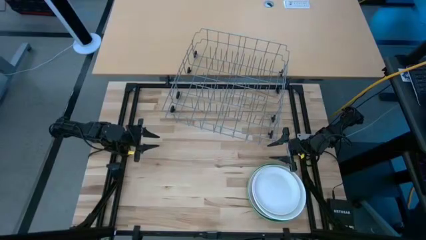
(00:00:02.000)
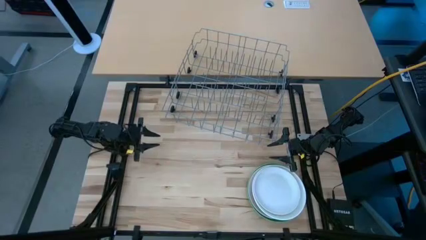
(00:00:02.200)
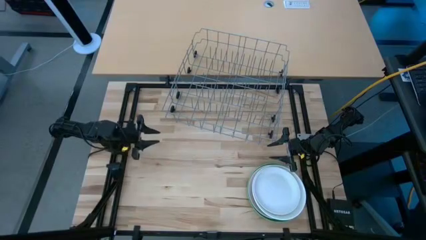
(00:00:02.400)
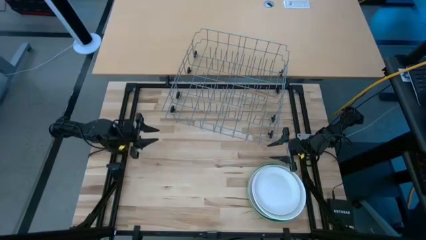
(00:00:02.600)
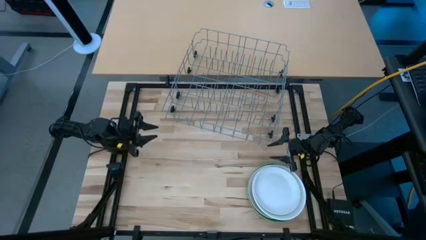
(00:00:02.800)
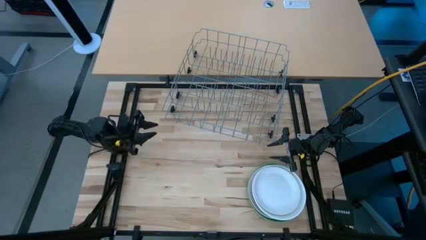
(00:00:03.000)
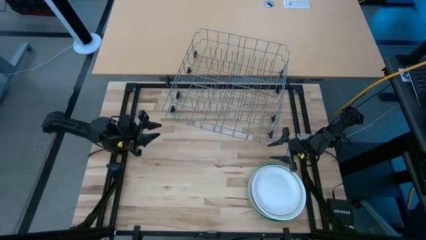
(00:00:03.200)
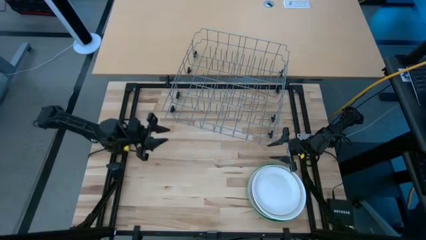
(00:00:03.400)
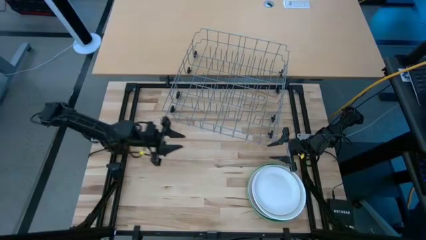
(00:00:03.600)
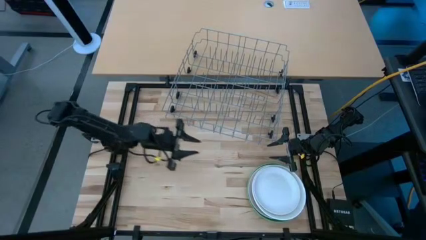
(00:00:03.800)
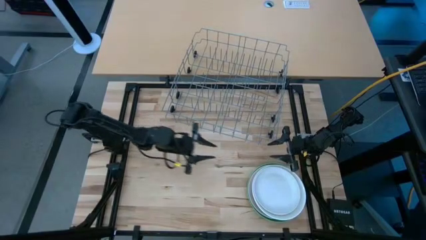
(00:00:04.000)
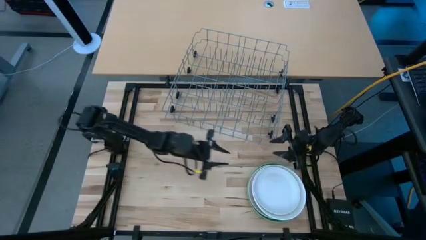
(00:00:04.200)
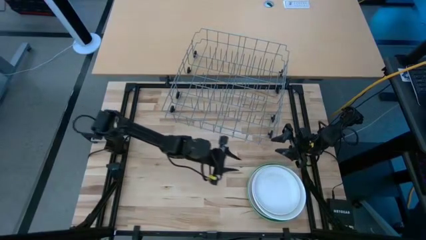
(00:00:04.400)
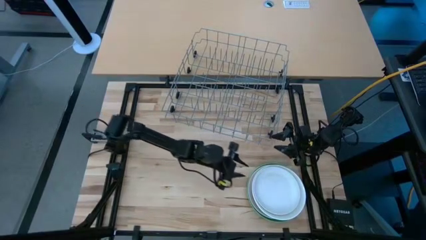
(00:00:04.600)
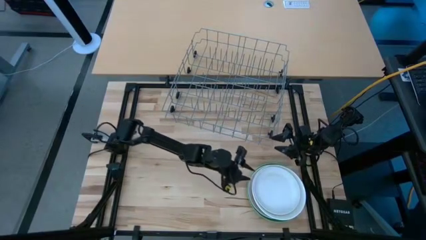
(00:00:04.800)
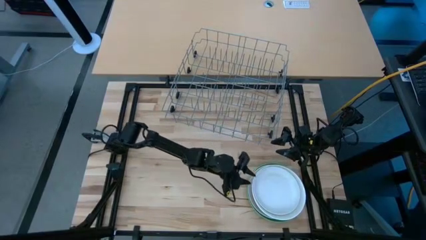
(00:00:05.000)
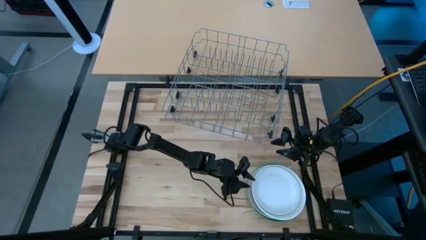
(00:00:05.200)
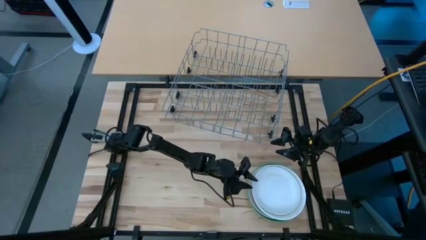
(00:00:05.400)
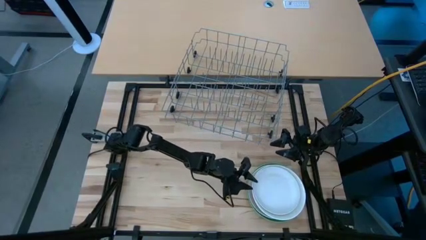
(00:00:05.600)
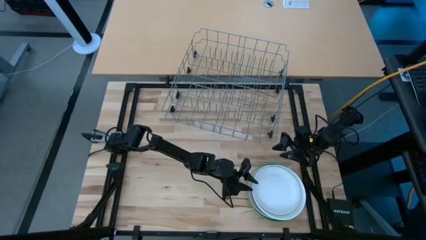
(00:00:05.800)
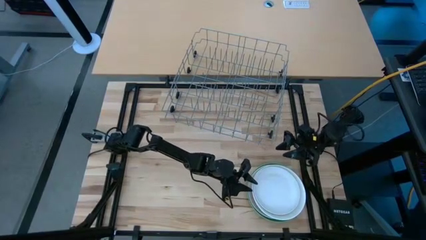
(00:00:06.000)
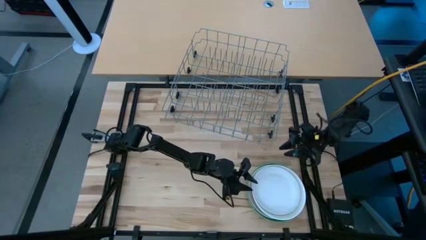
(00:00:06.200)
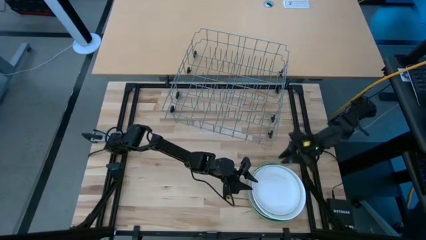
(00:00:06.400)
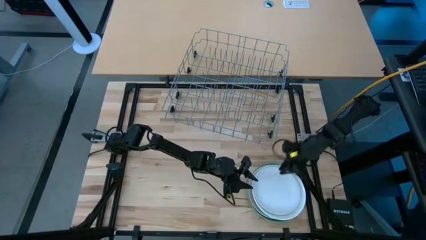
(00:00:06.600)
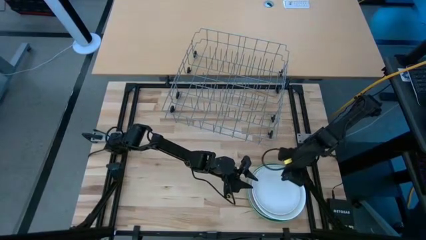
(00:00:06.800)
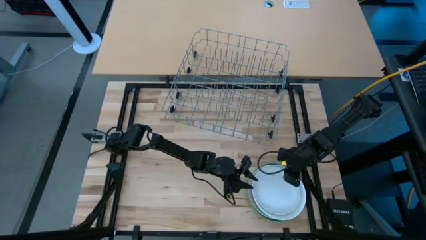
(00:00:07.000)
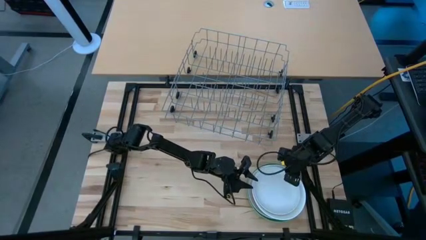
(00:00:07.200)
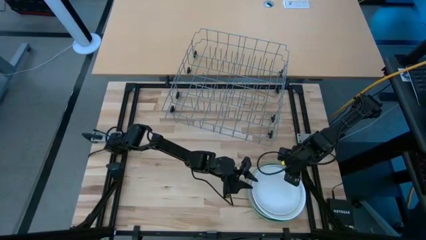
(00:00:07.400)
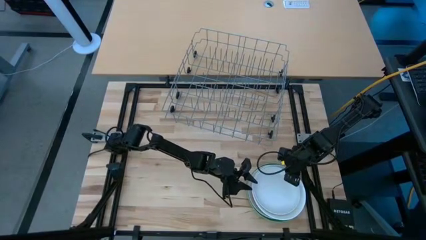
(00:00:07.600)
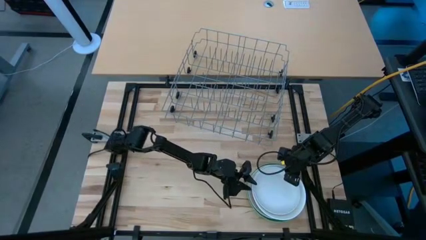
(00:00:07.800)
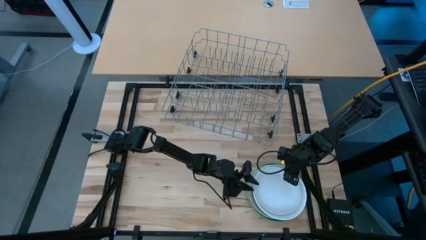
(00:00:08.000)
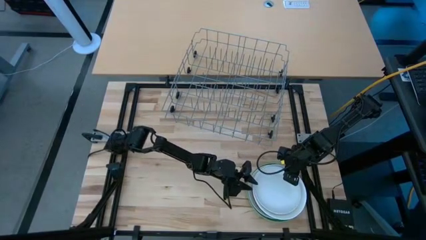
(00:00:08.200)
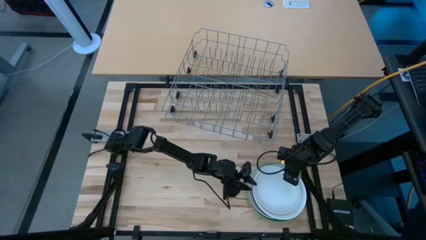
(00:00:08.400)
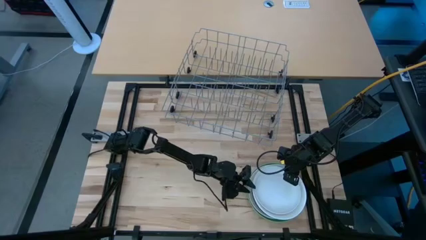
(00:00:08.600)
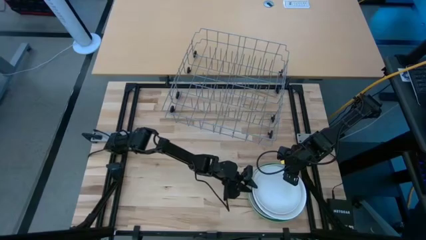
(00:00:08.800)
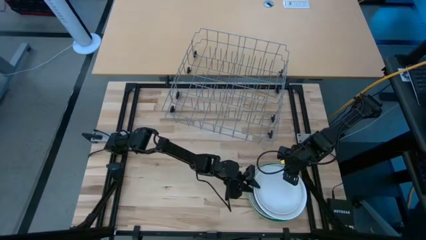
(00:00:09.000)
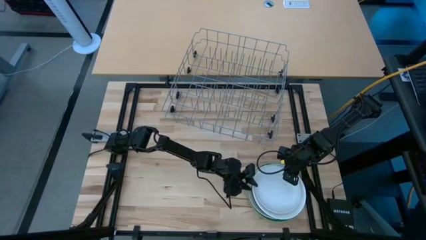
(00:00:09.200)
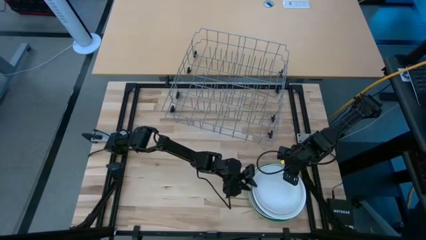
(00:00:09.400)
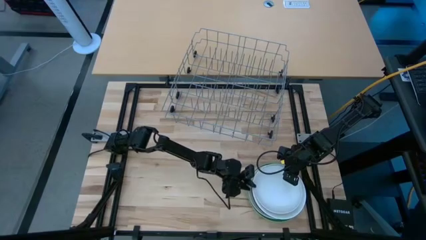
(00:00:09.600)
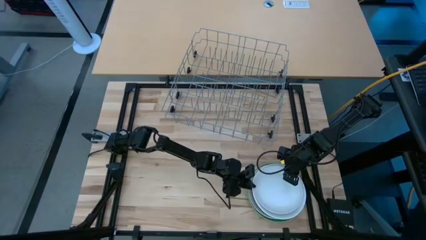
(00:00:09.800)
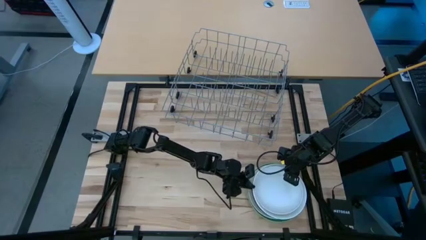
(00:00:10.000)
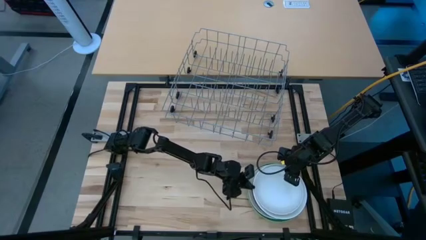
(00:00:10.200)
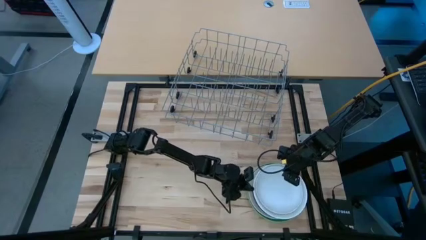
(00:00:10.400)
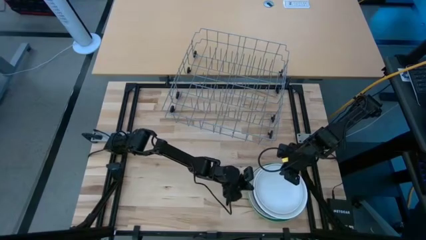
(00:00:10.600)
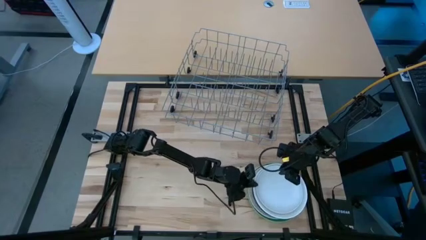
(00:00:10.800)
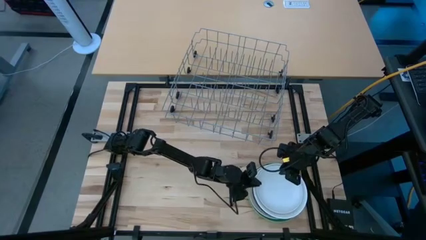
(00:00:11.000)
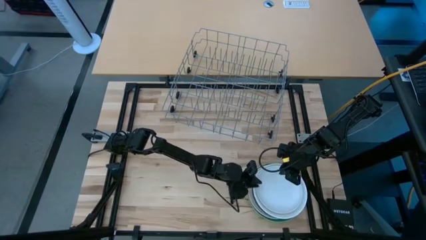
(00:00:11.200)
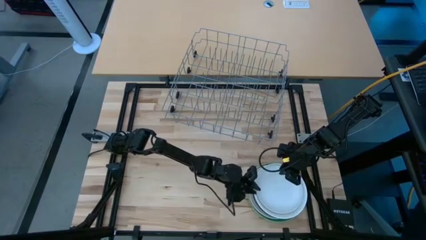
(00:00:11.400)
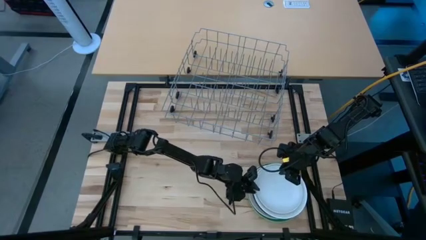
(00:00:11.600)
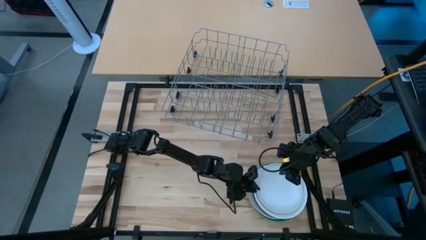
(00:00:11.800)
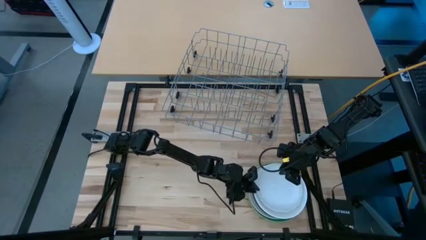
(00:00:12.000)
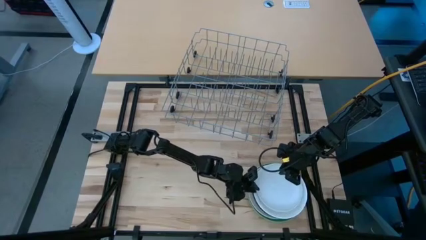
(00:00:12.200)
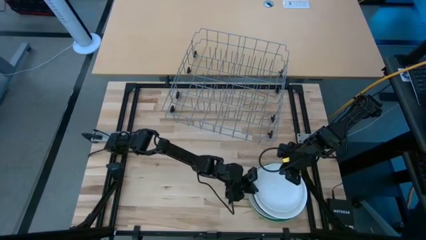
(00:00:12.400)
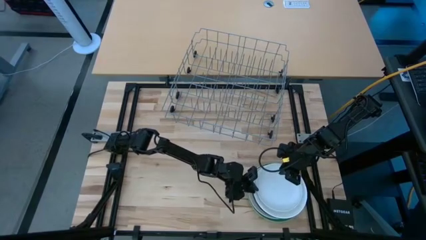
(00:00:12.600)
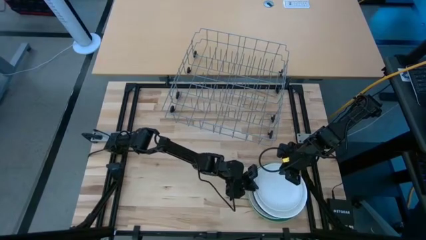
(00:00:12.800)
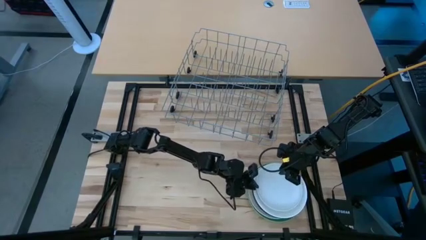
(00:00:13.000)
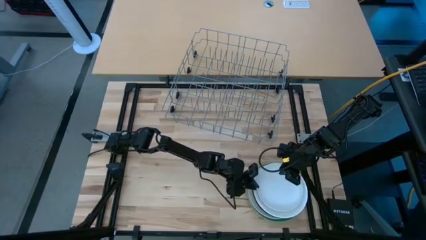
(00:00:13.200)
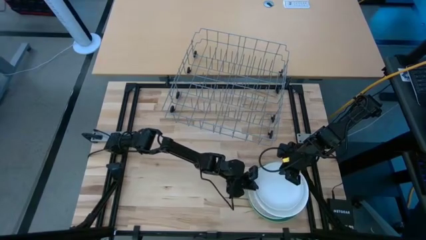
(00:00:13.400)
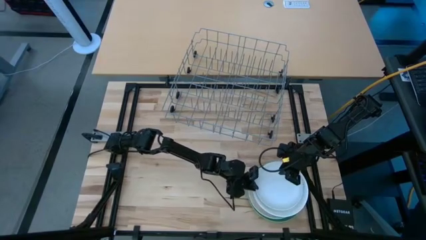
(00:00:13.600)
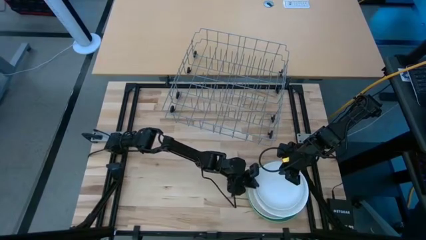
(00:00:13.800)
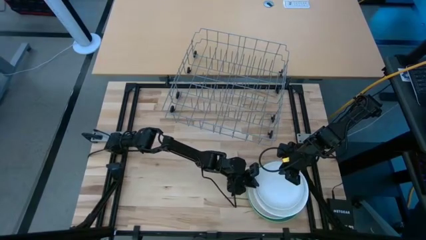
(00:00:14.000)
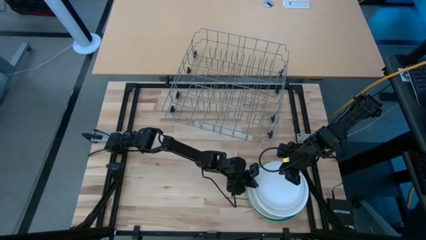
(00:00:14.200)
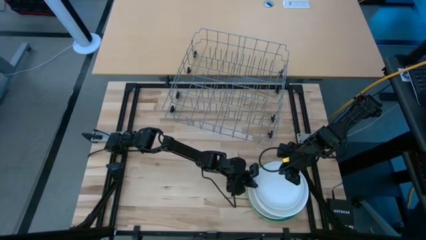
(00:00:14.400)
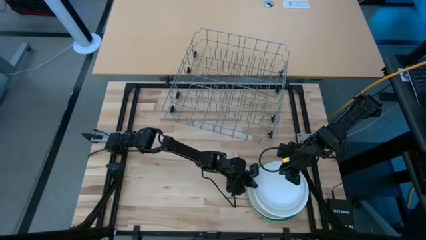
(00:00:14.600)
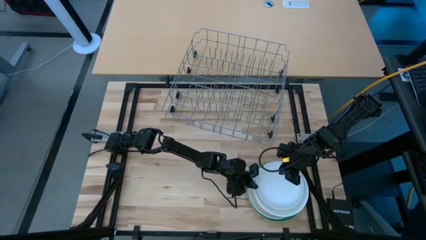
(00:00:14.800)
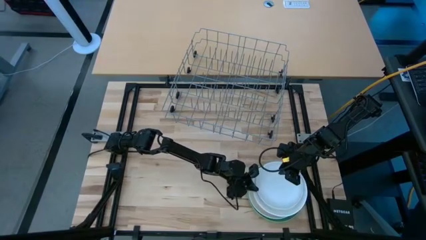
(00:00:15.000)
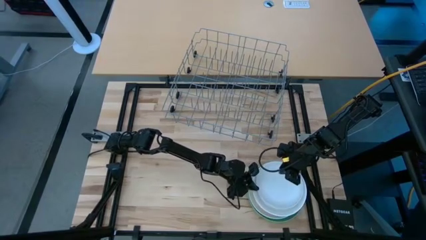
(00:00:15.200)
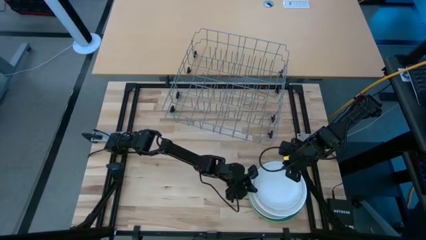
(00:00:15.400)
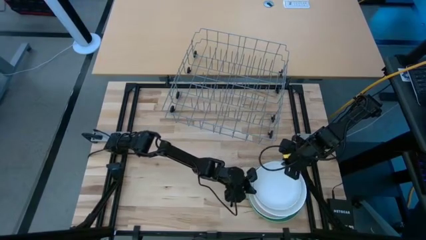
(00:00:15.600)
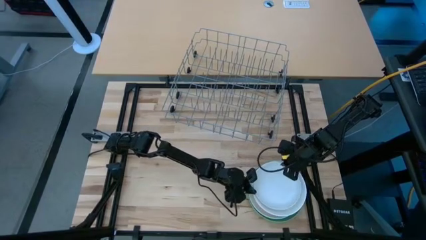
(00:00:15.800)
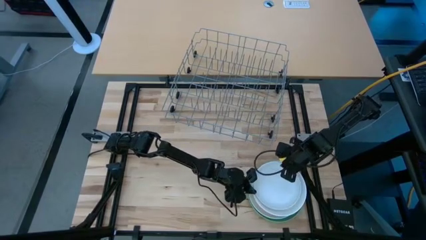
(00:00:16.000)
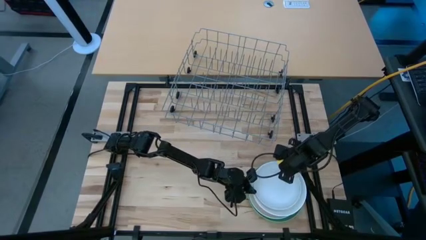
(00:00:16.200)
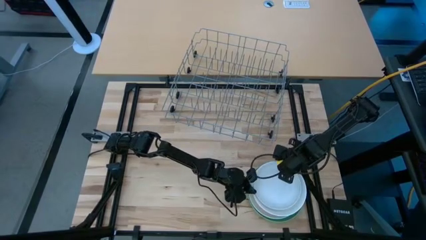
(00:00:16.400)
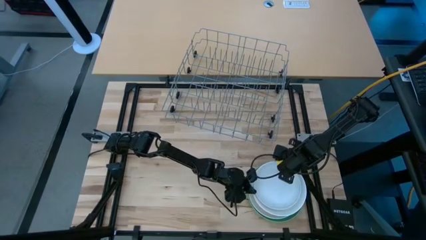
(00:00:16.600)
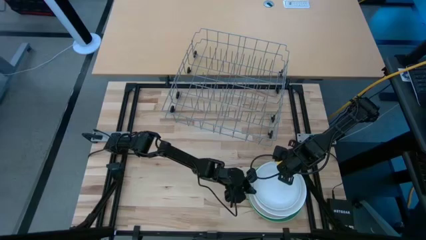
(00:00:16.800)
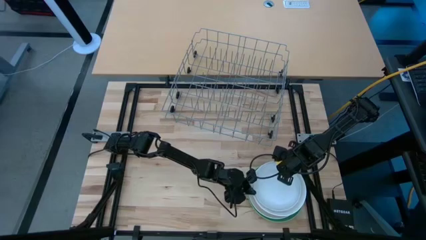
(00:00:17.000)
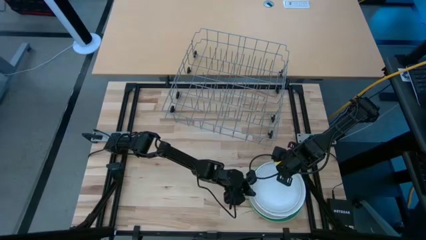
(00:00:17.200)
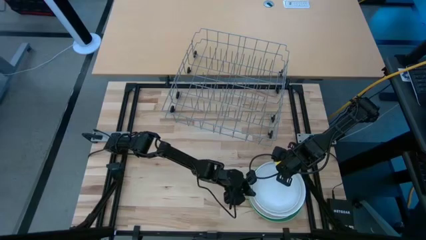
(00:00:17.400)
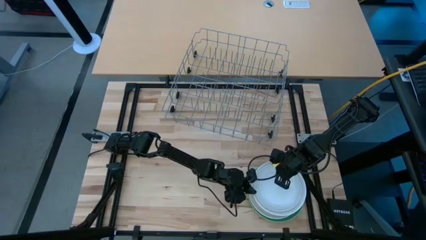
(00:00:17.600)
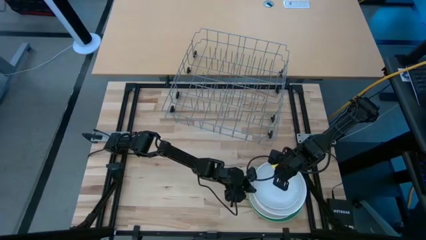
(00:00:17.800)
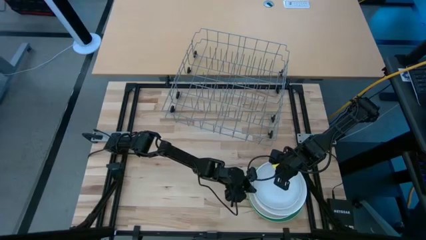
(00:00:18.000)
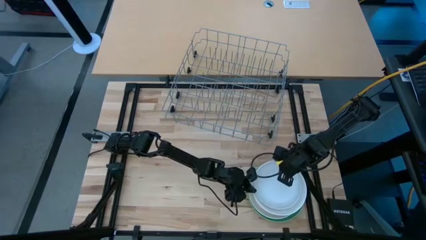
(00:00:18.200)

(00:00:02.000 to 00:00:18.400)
Task: Sort dishes
Put the white plate into the gray dishwasher rack
